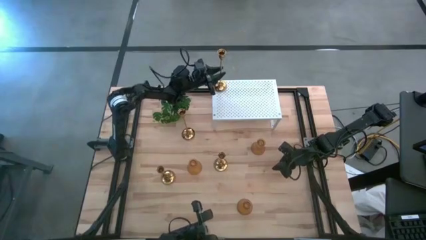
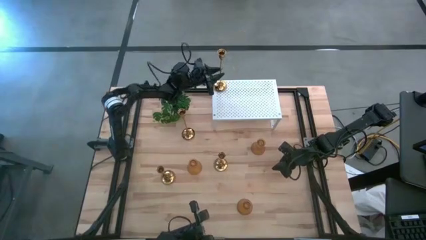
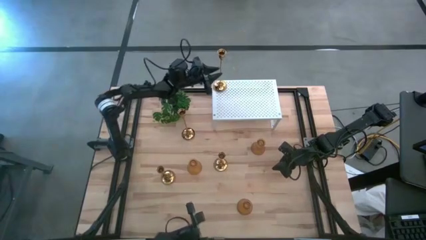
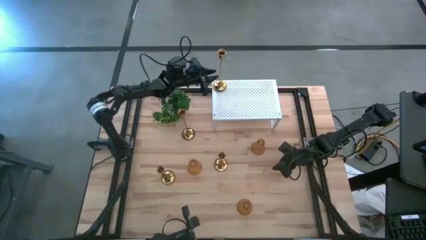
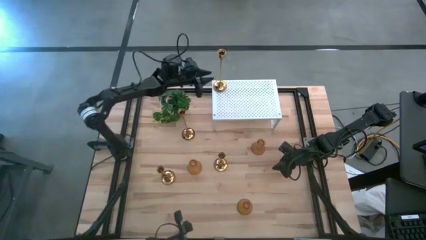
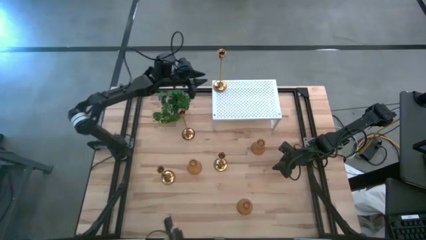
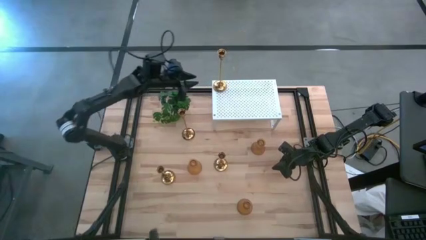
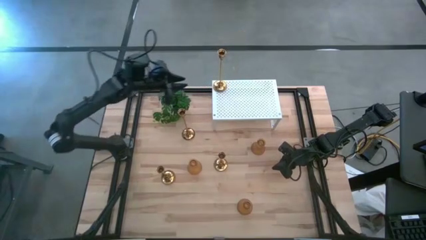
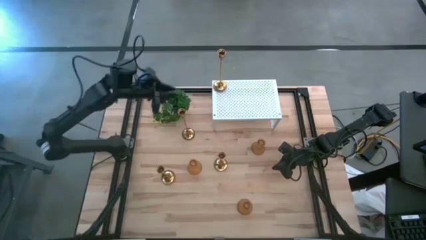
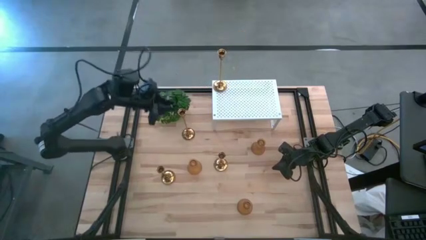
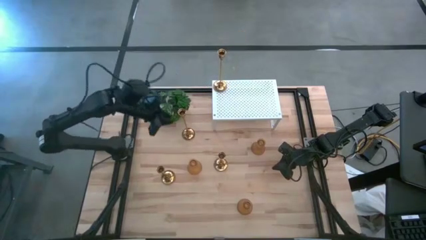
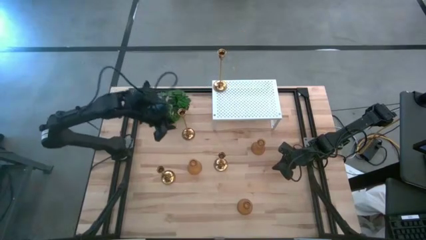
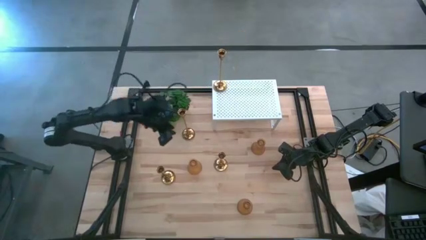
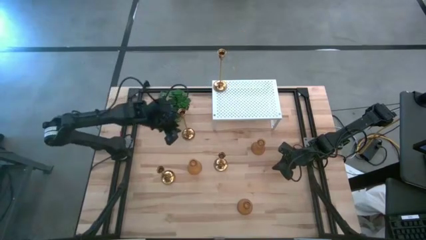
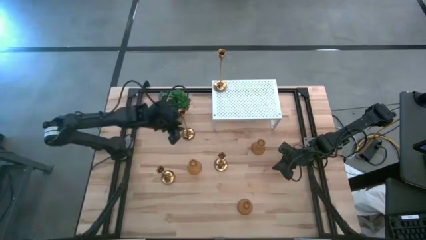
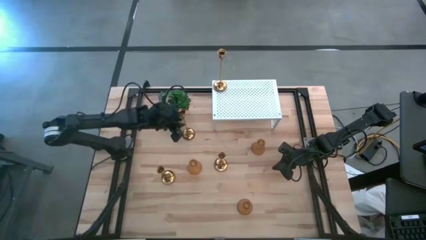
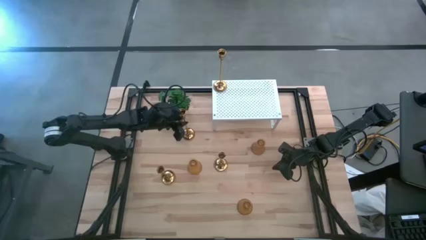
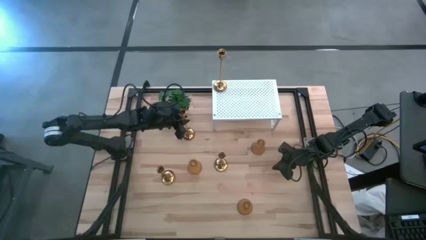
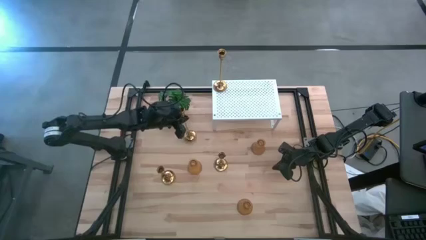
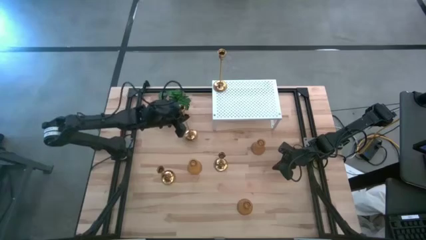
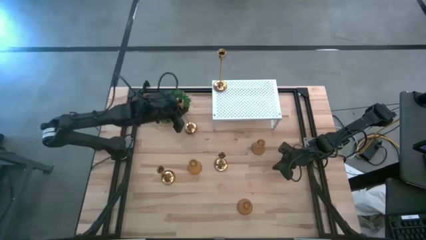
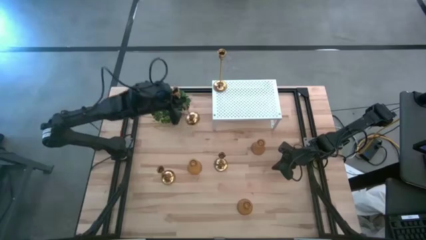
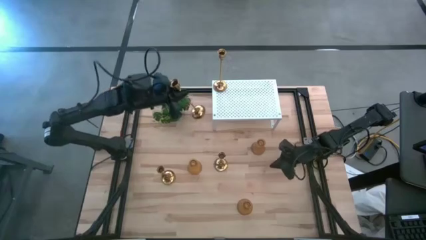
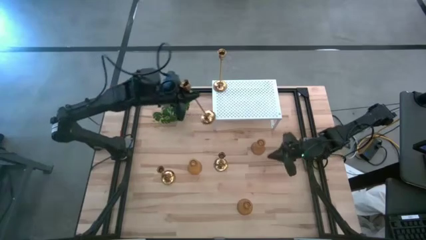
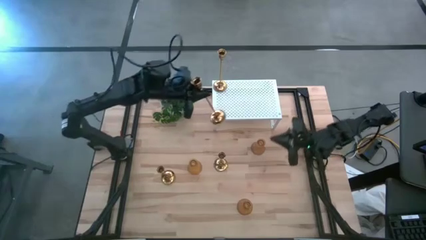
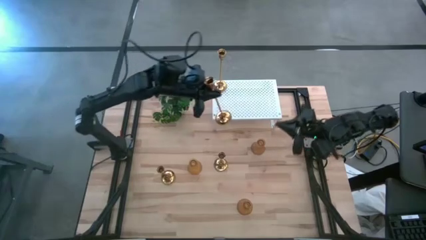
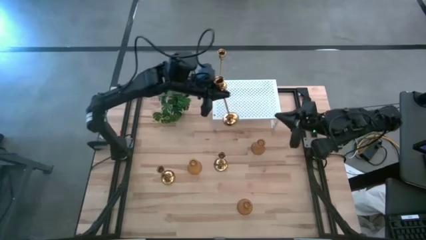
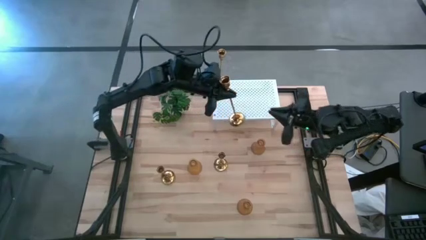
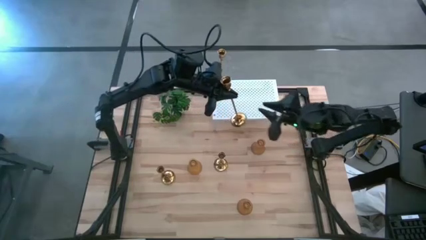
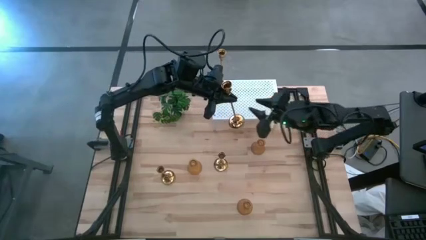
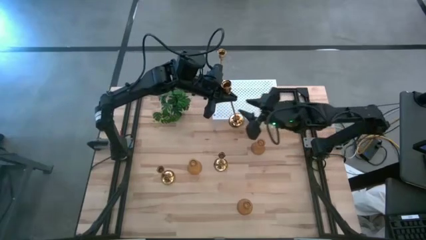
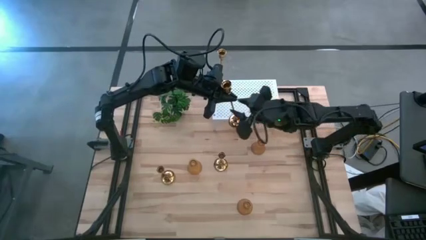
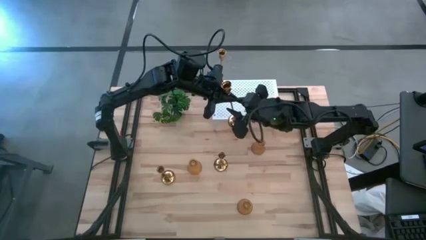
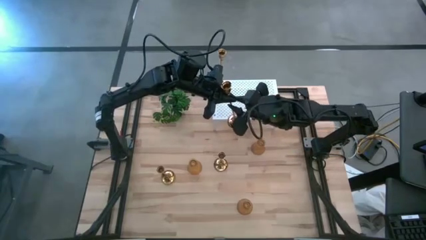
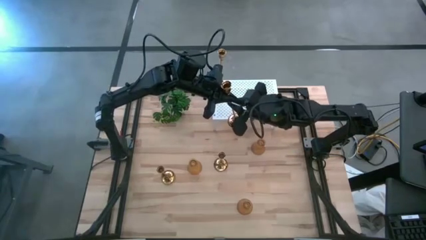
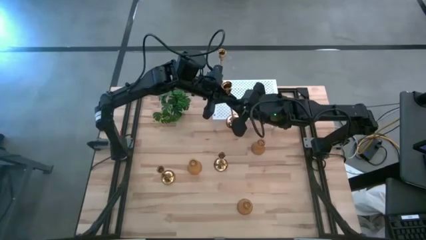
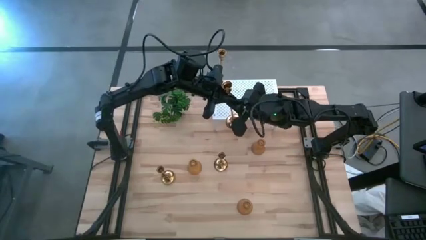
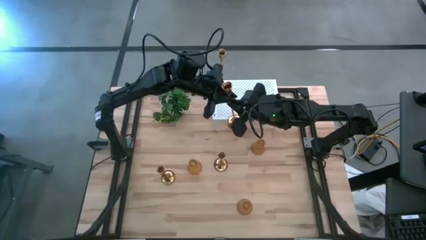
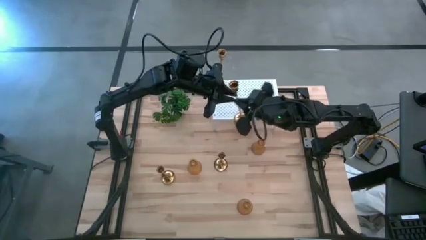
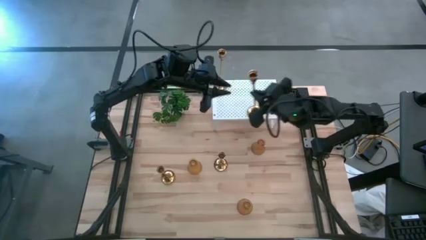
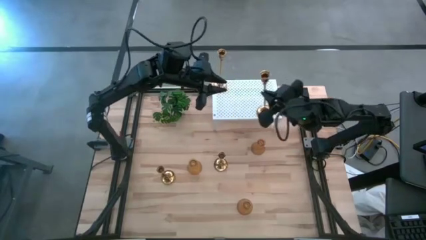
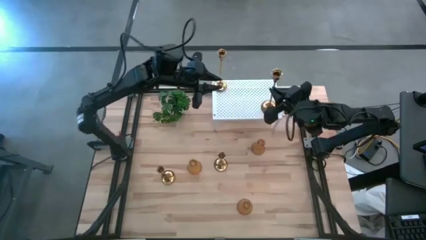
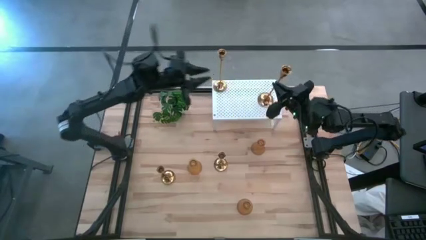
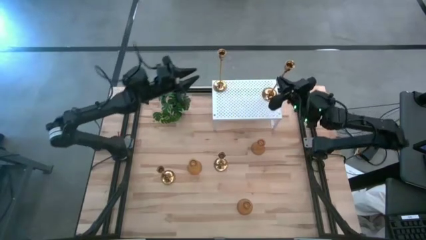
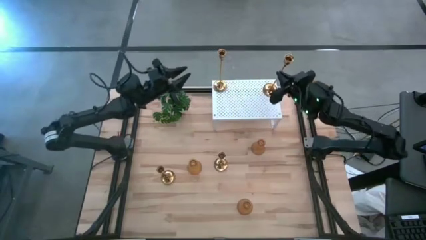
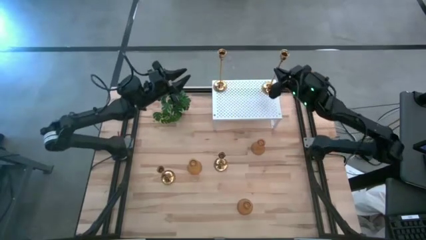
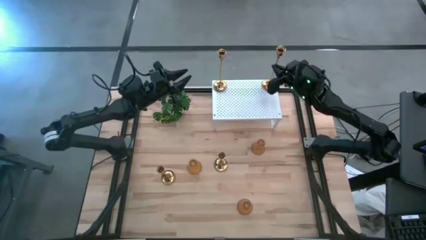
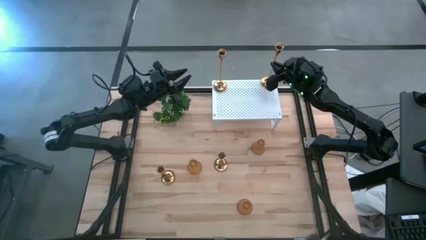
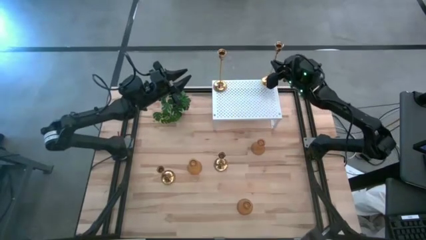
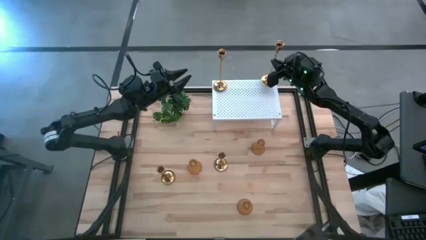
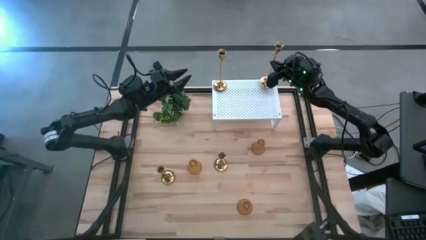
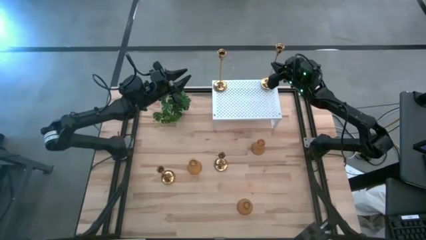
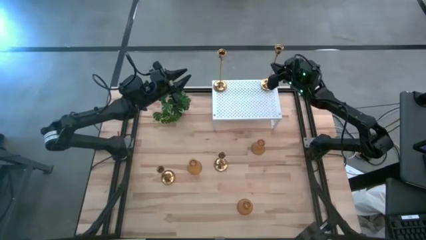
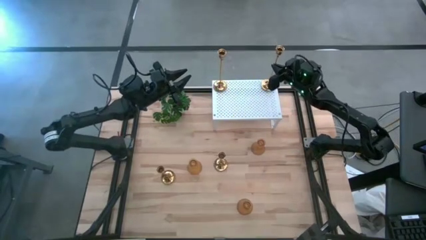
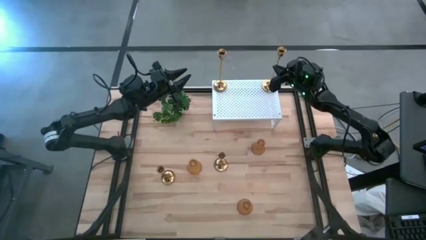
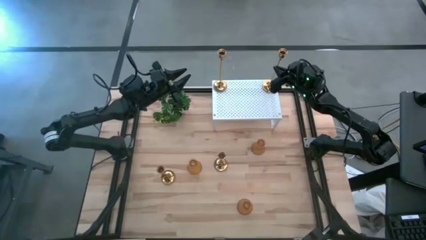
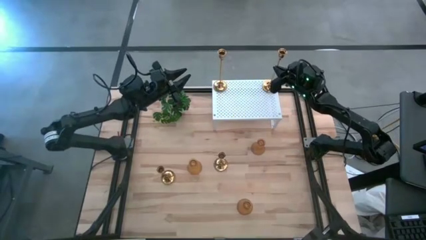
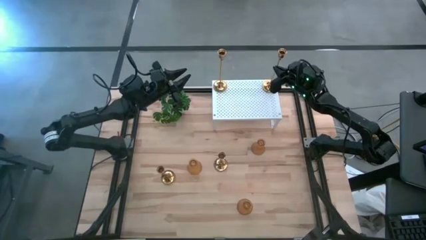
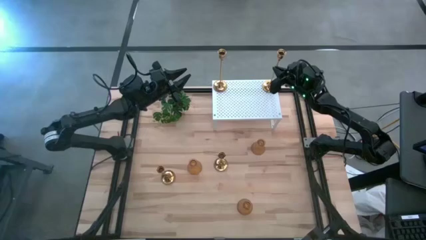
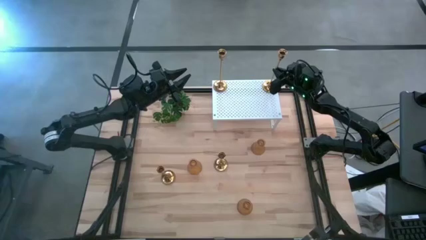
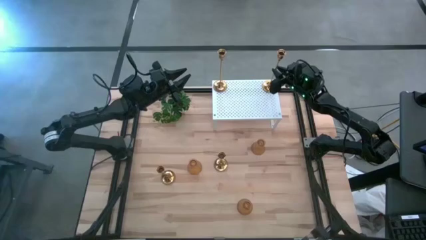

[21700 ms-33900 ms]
Task: Pick & Place candle stick holders
Put the top gold candle holder on the shelf

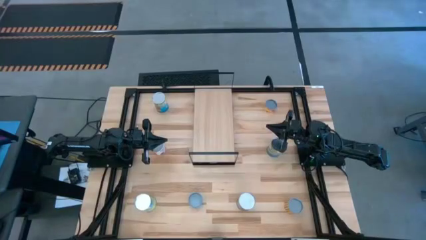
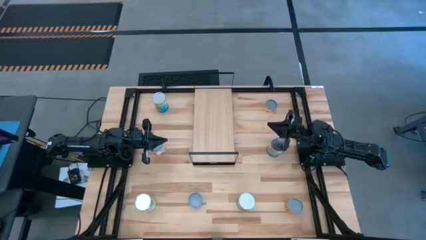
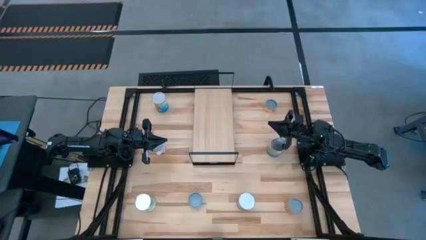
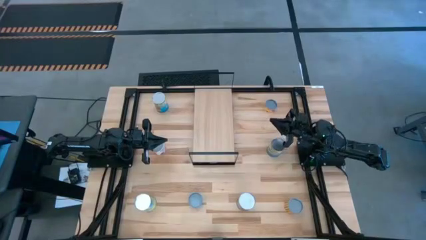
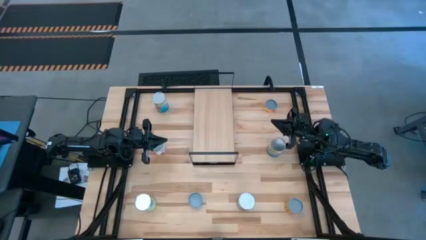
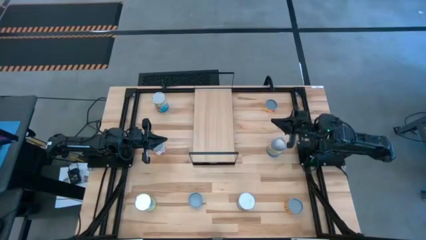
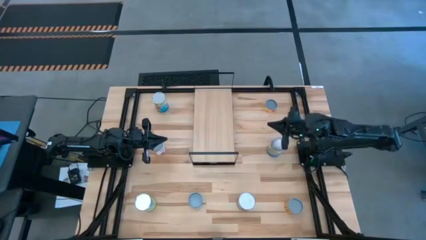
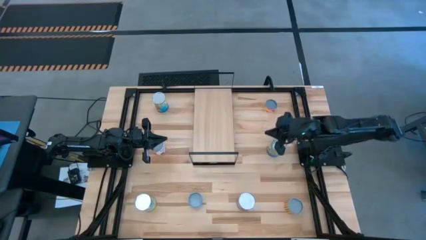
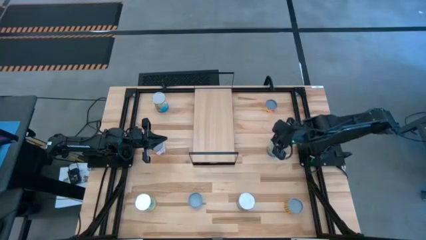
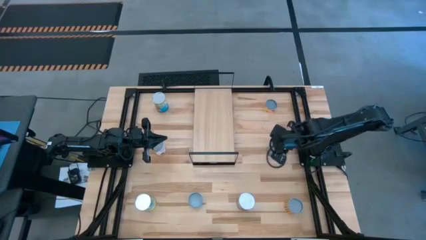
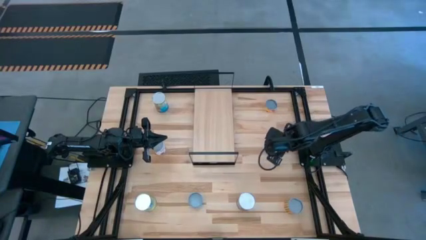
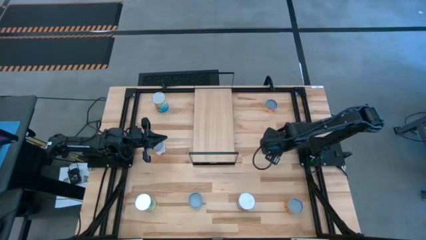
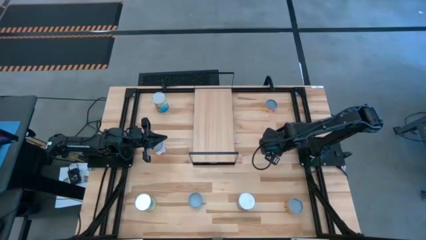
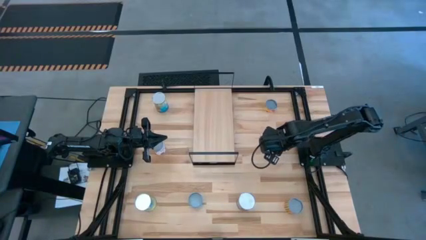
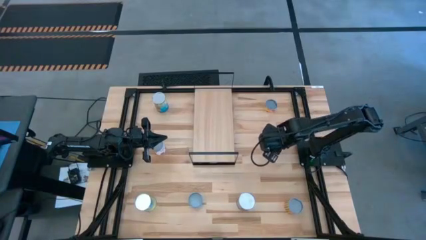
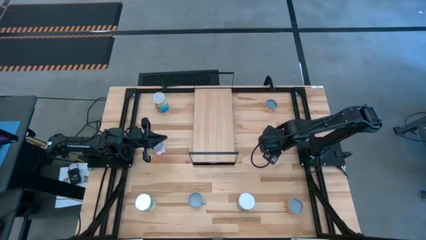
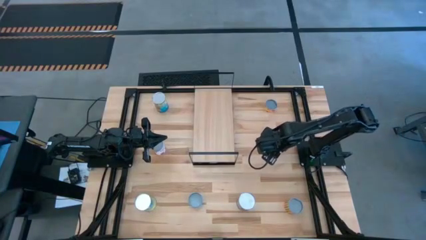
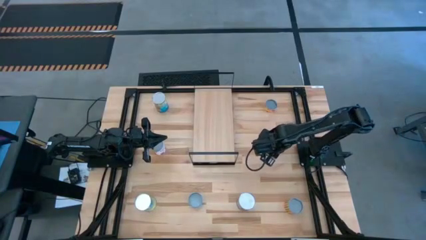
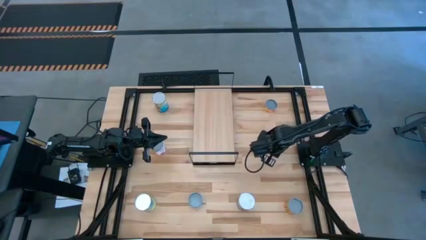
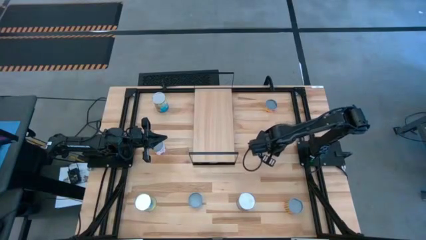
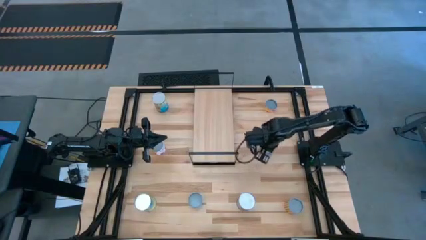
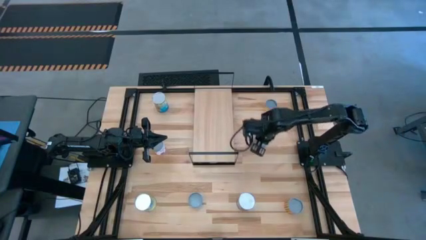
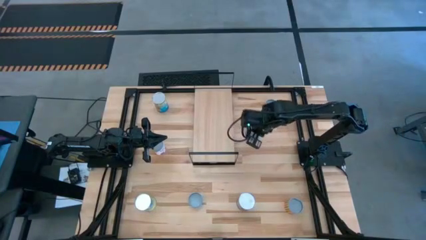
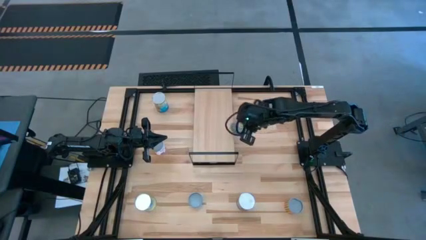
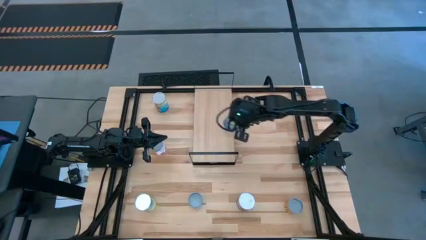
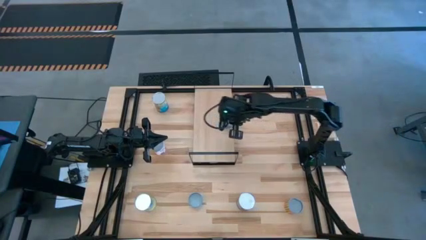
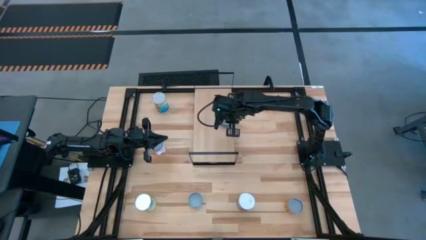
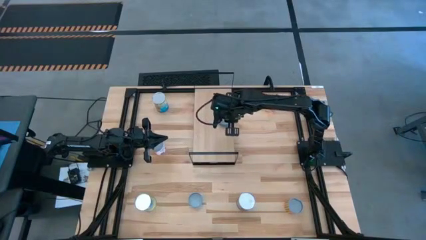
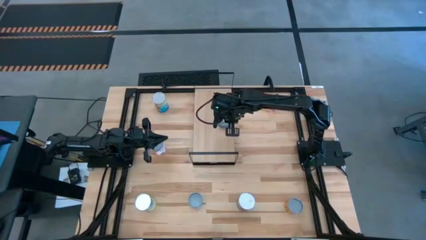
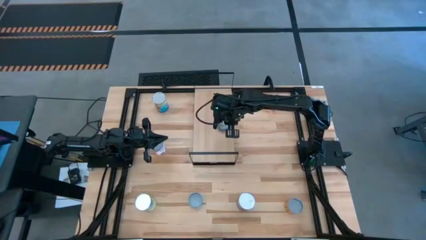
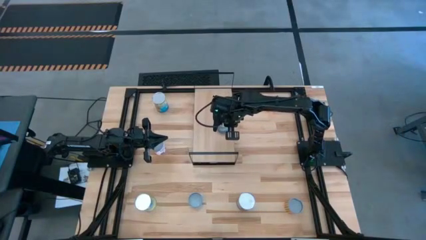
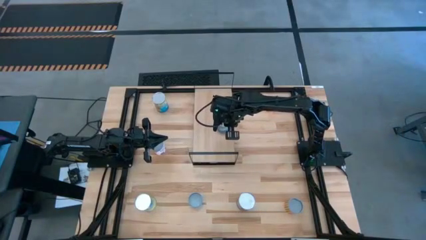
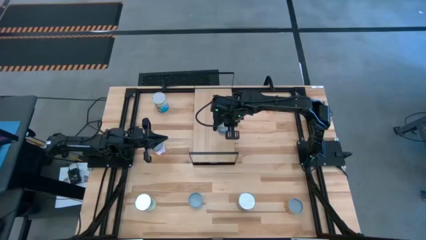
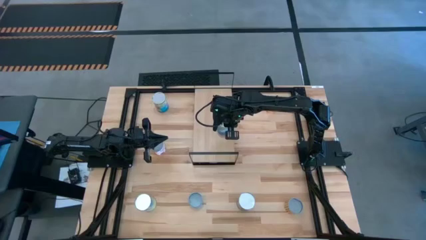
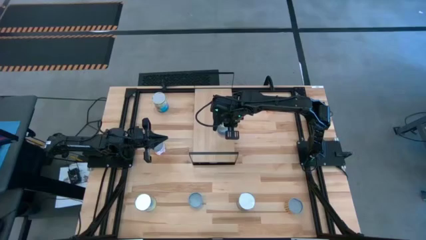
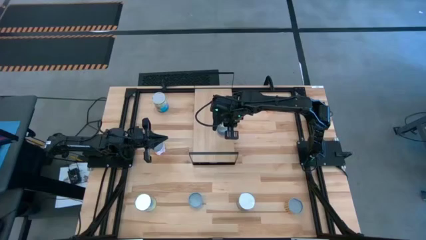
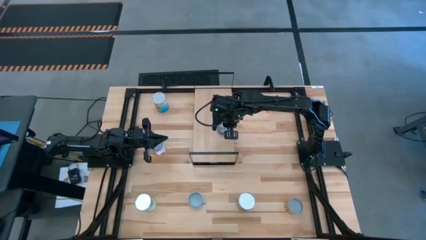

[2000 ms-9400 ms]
Task: Pick and place cans onto a shelf
Put the canned peas on the shelf
